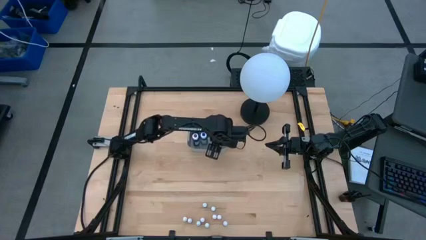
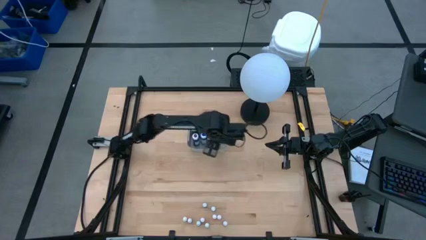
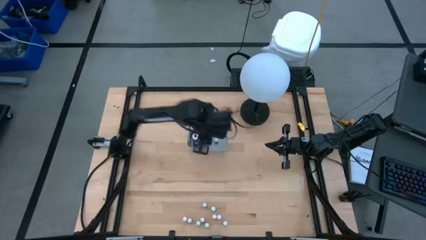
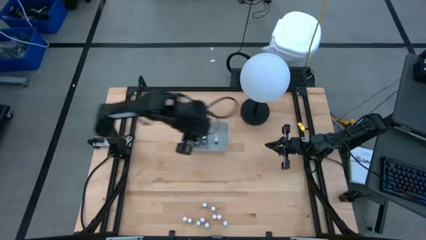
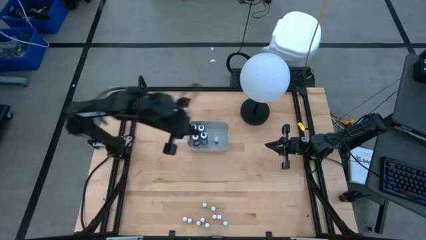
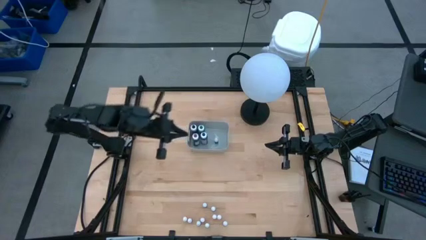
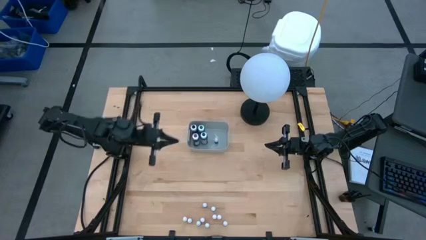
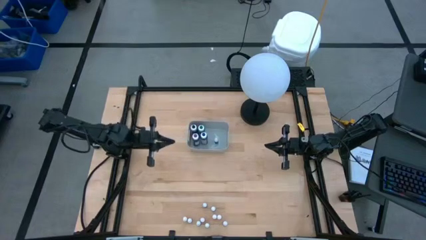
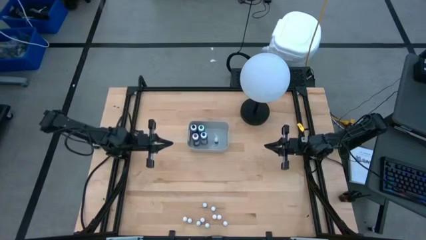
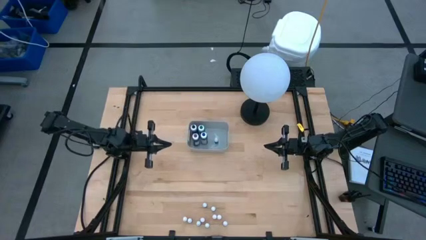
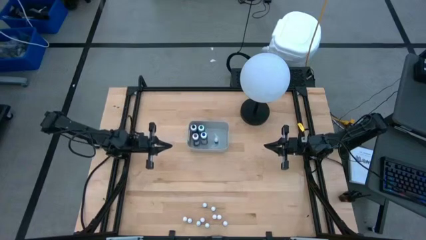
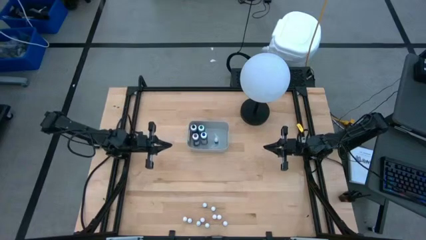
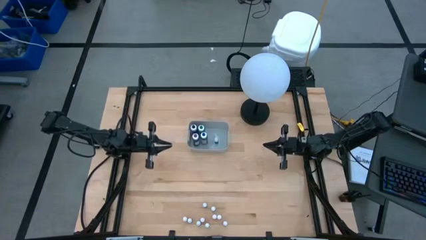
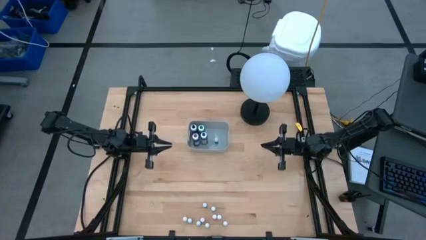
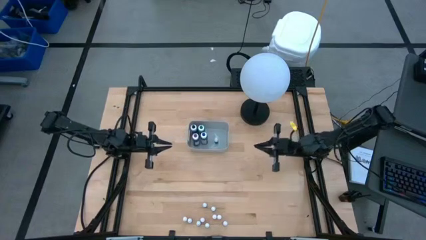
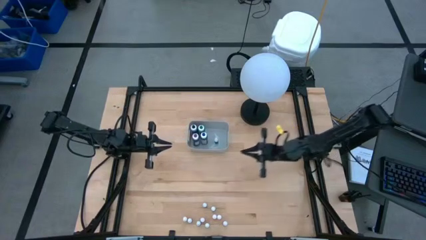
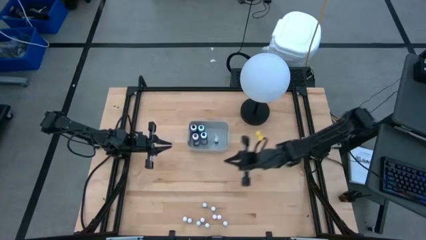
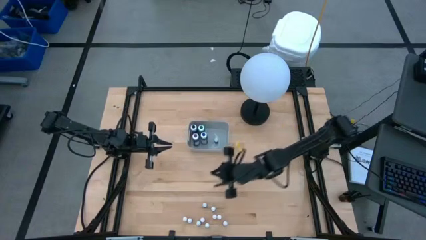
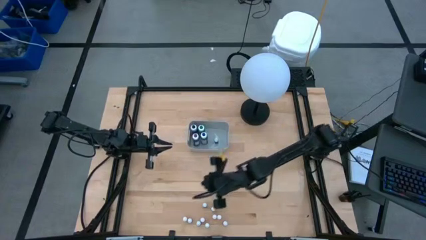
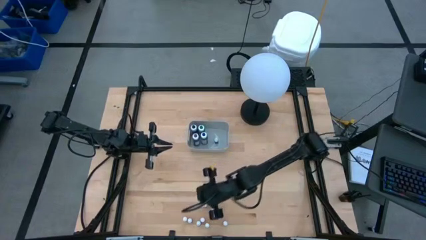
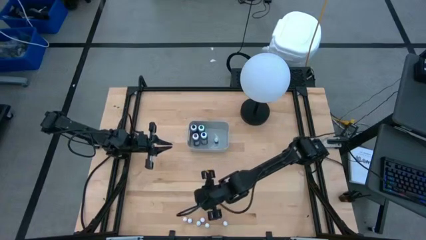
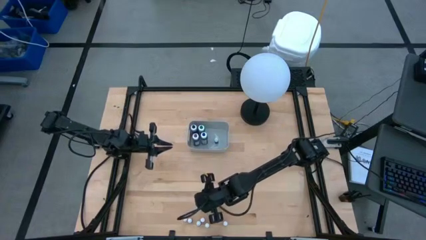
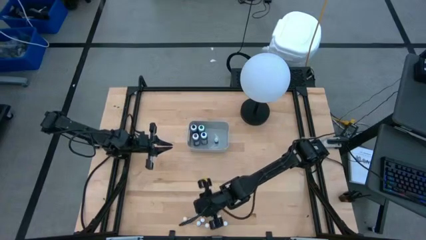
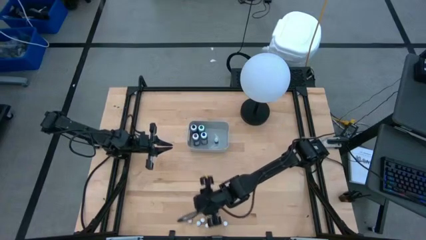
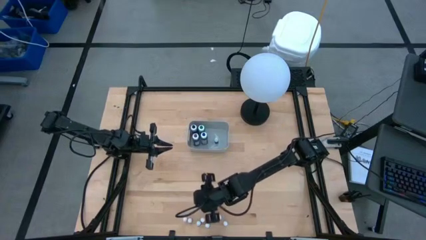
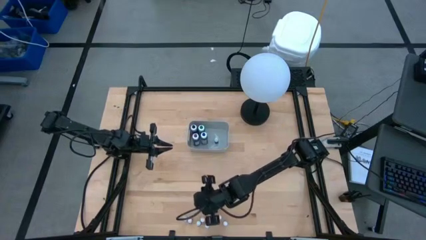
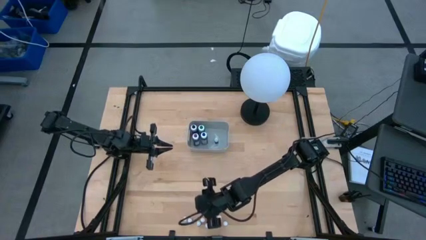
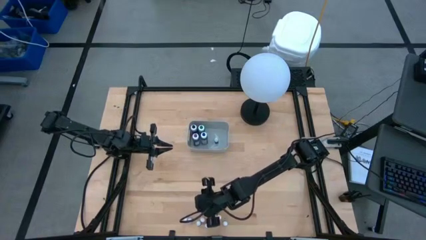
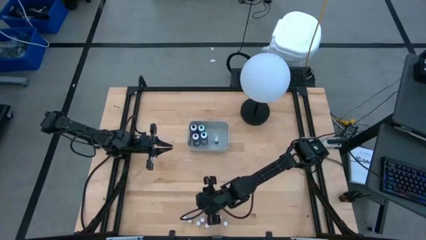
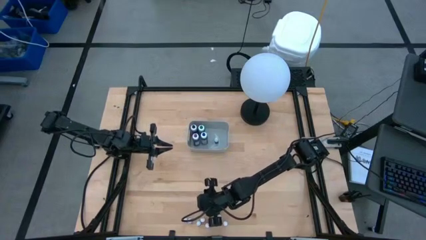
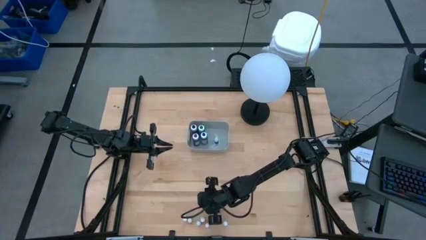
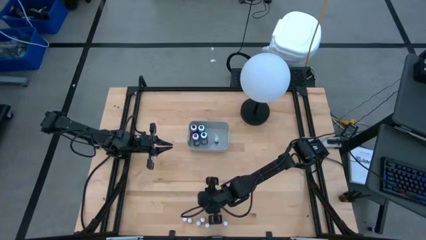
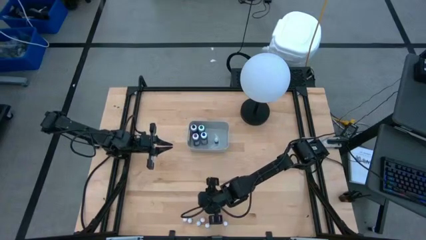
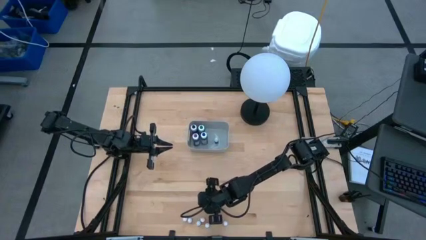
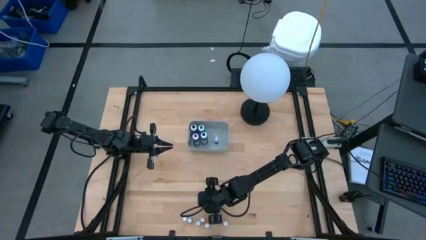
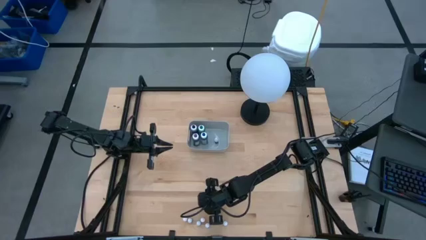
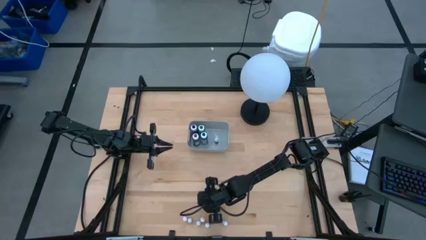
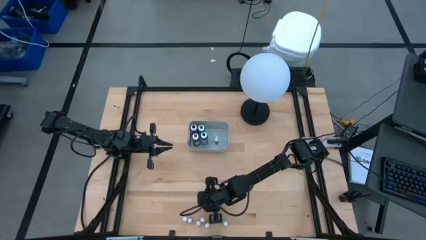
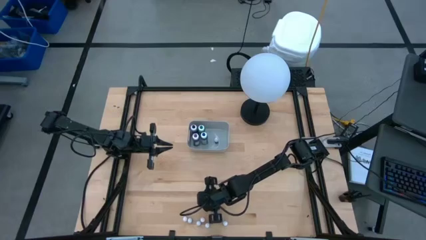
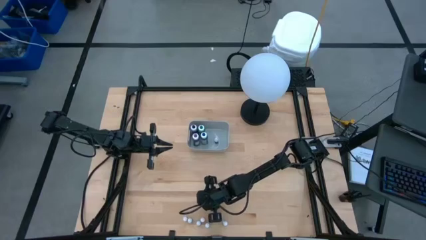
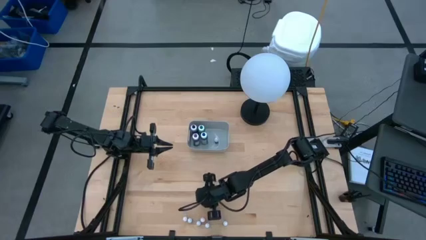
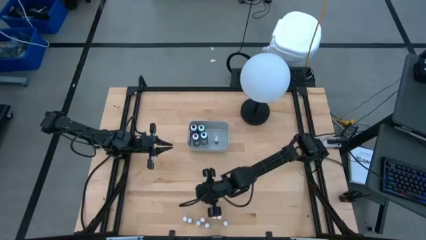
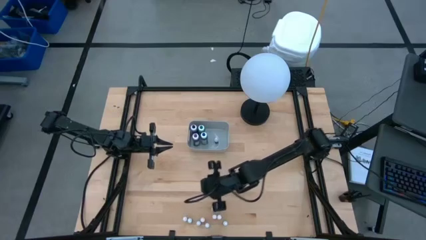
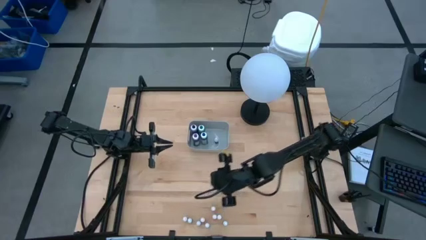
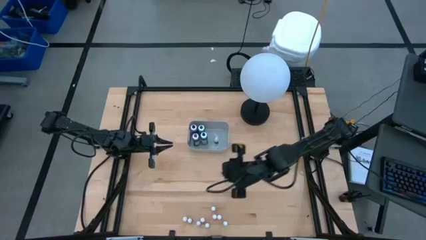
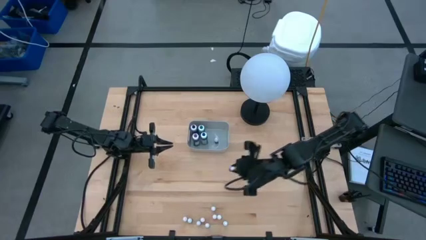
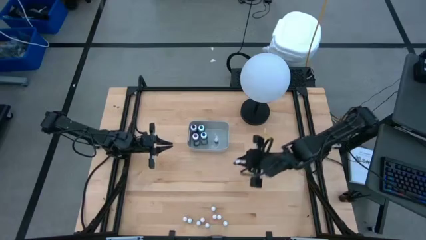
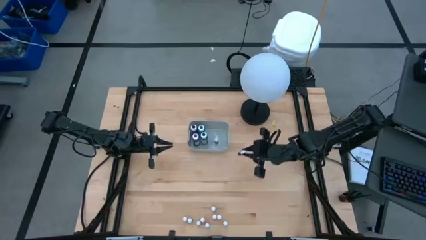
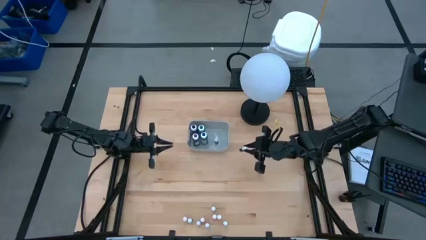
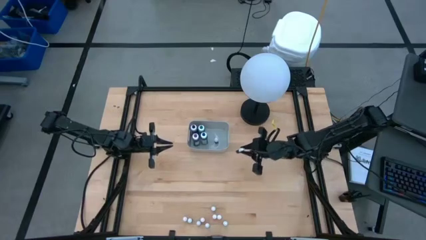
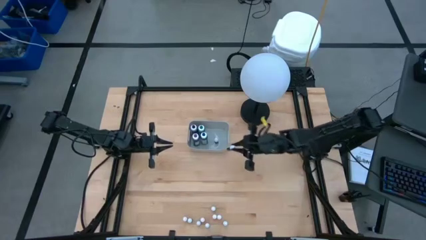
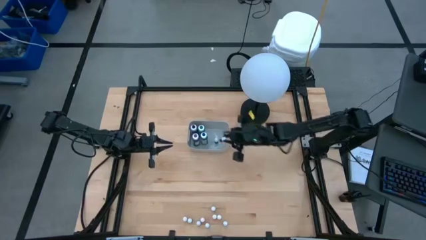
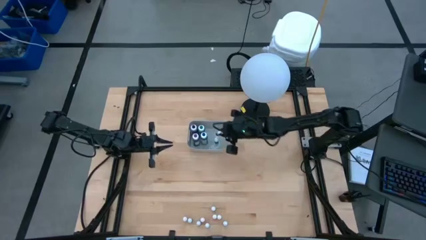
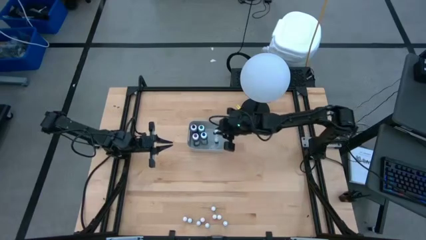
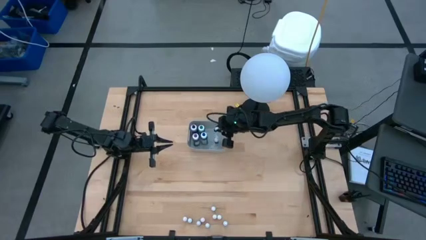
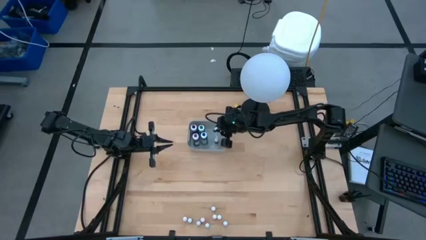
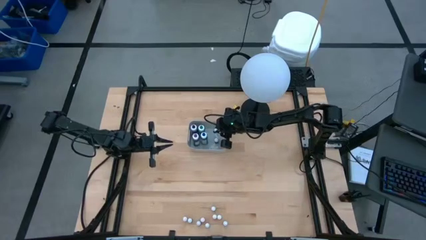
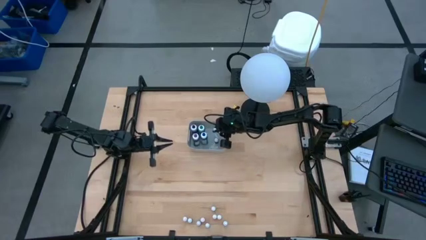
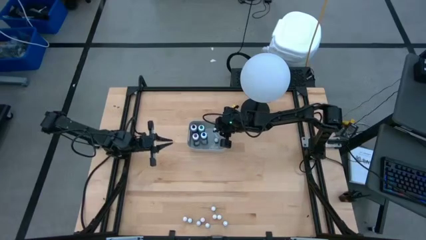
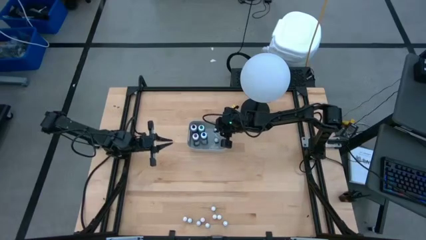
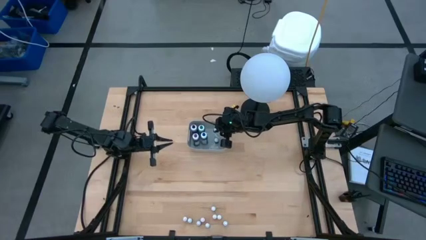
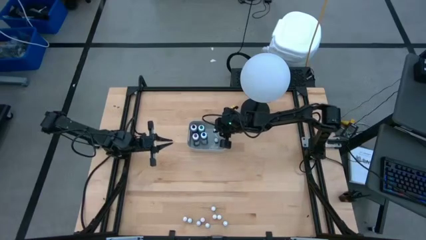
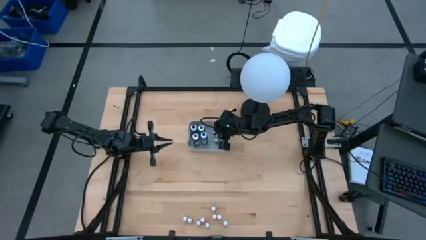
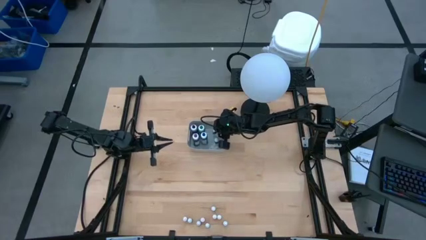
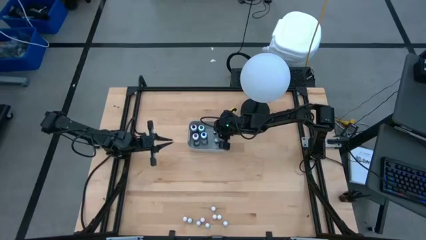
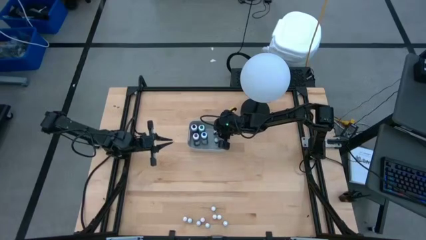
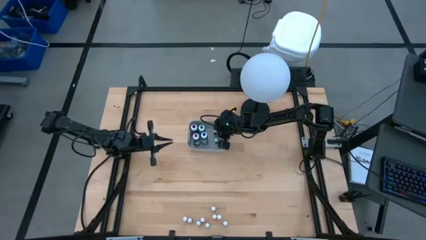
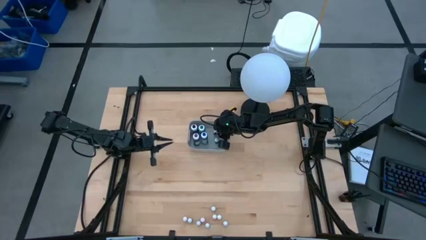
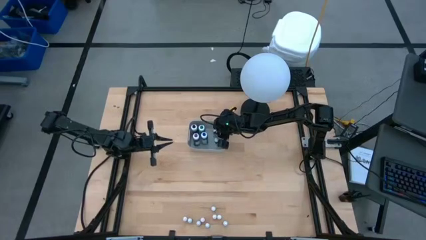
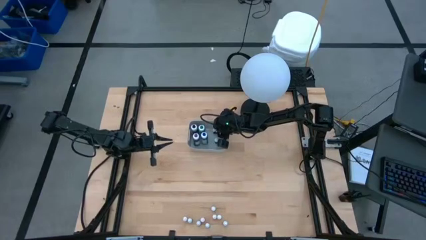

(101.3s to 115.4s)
Task: Pick & Place food coloring
Put the small blue food coloring bottle into the gray bin
